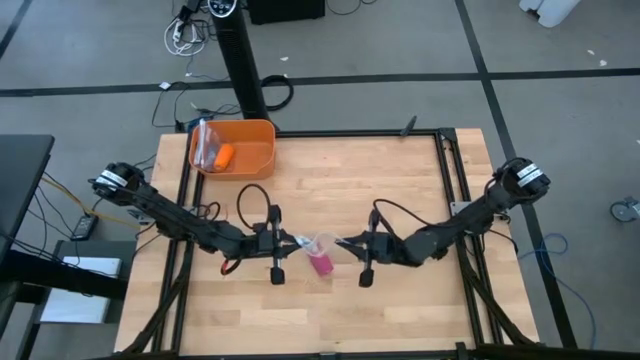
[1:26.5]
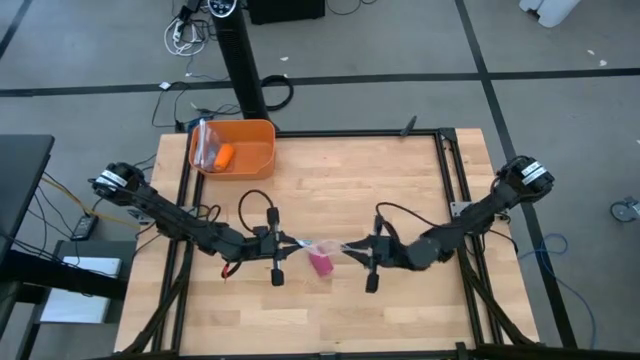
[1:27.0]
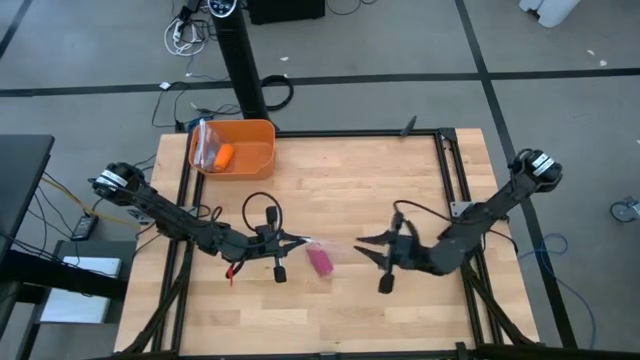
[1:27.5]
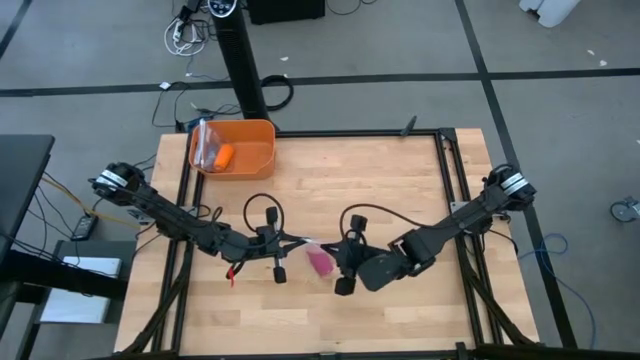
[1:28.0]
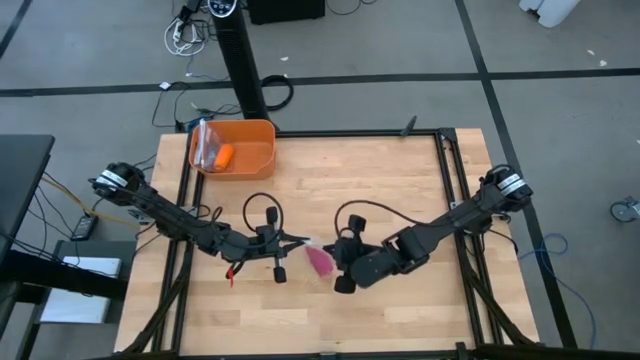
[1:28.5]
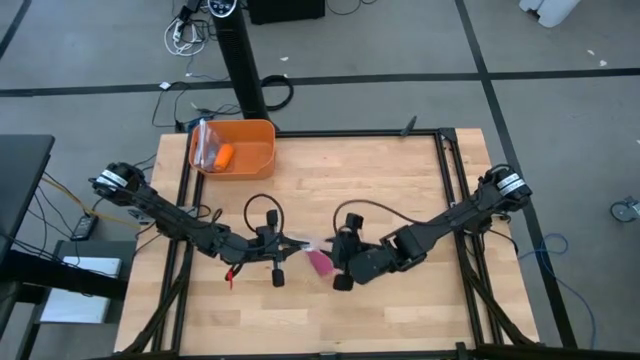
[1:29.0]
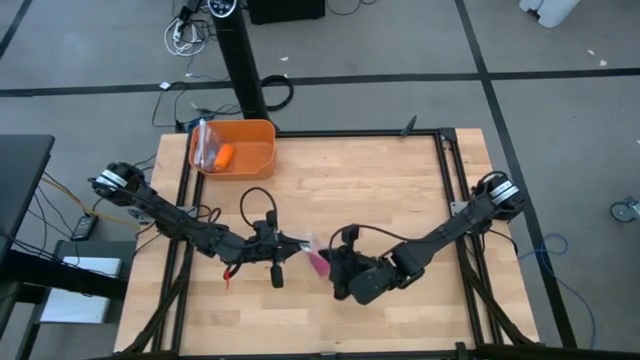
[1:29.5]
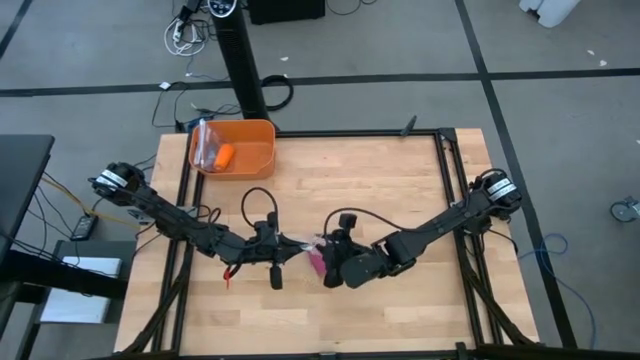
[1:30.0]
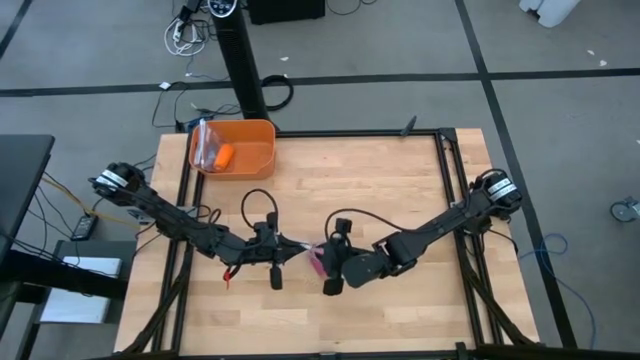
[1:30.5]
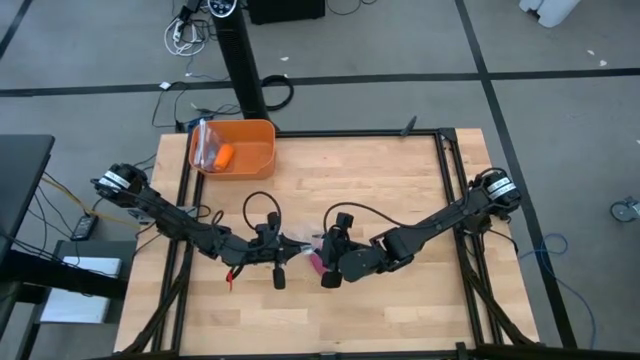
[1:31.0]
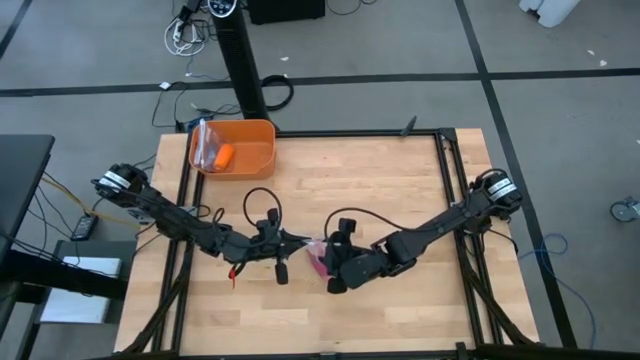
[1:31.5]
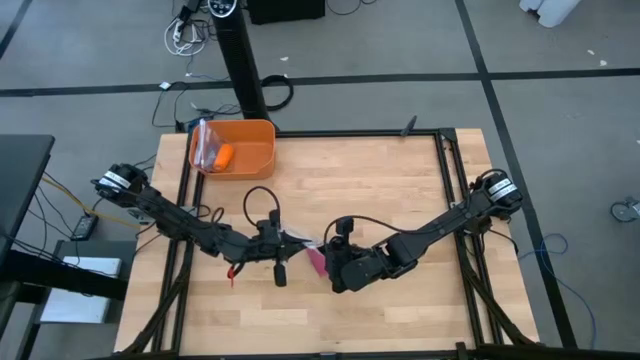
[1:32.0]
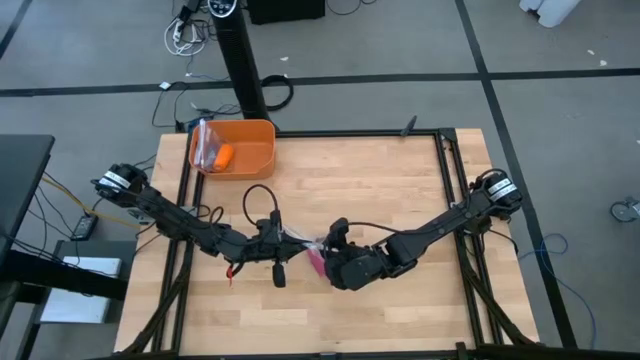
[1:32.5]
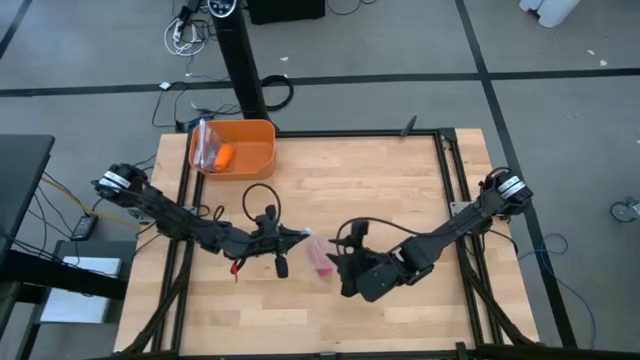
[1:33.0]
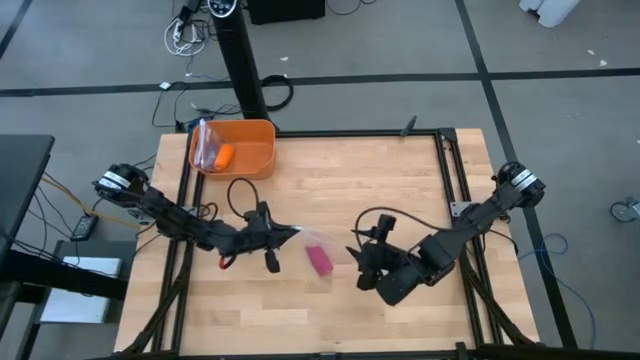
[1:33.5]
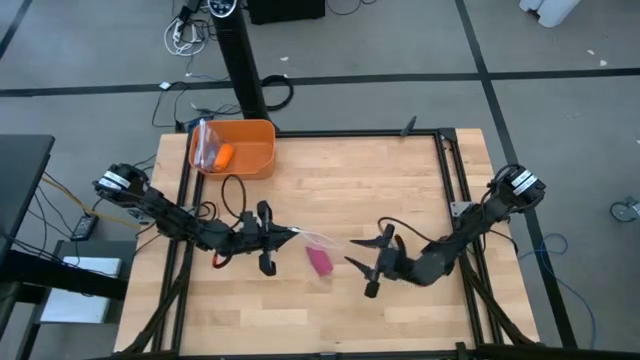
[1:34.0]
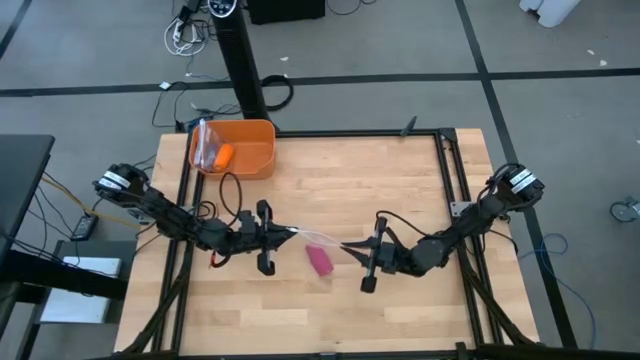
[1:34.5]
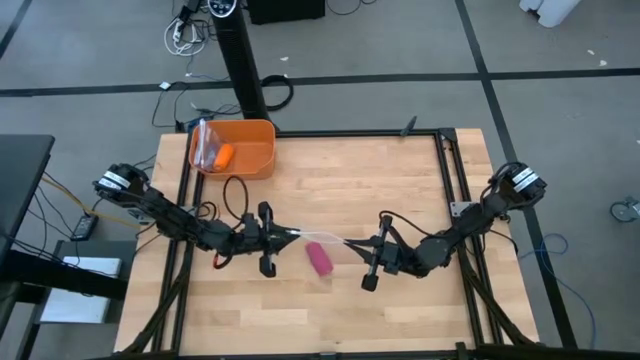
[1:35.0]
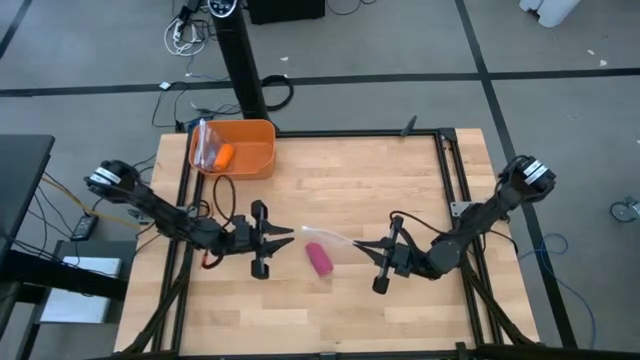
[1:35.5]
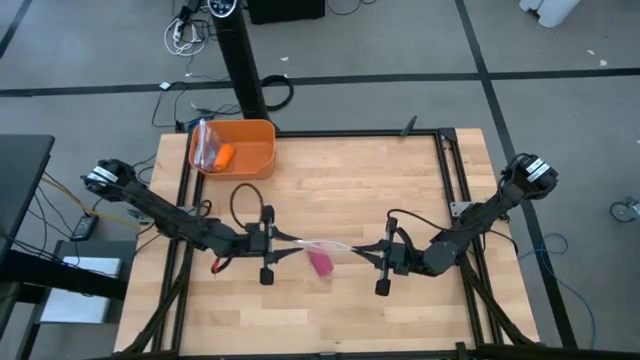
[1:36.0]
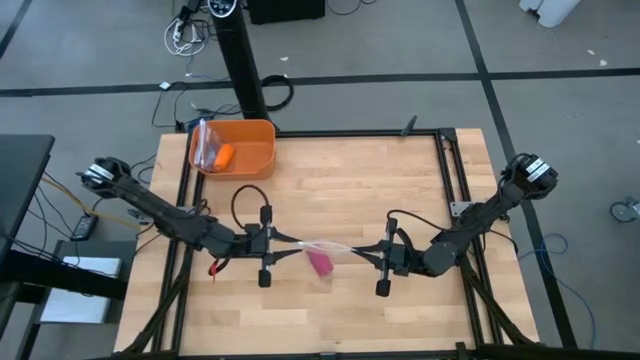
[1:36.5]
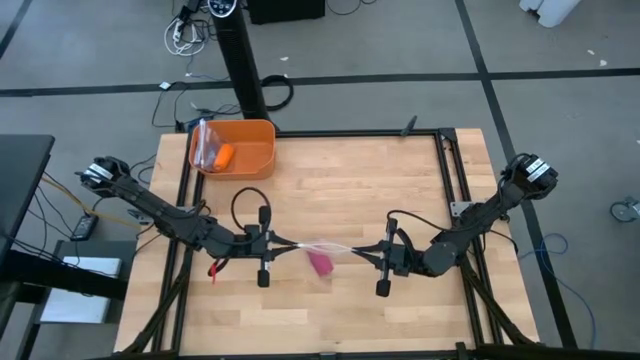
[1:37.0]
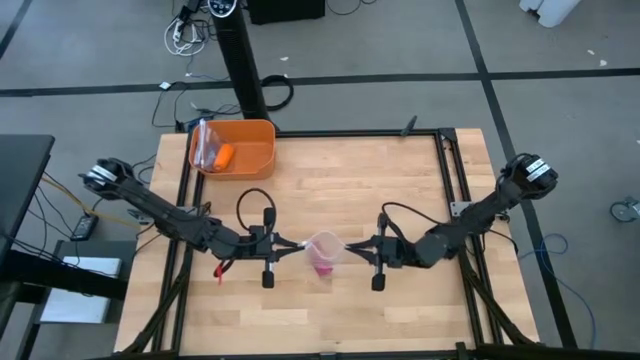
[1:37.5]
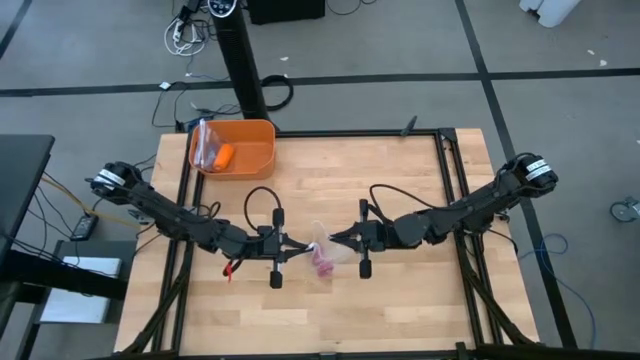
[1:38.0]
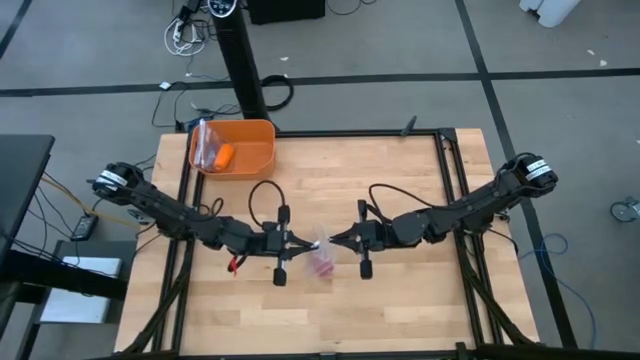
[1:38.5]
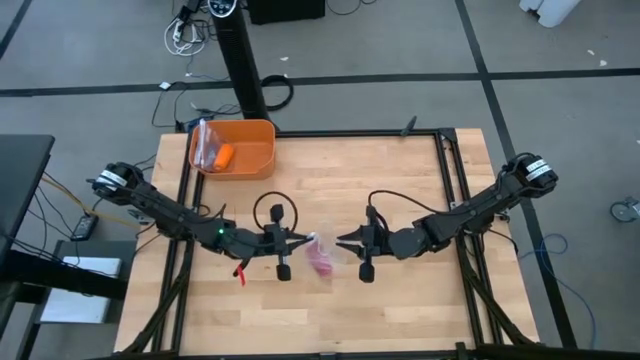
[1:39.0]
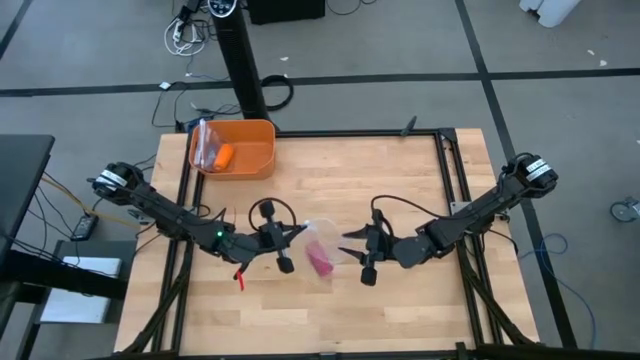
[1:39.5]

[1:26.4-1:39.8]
Task: Roll bandage
Open the transparent zip bag

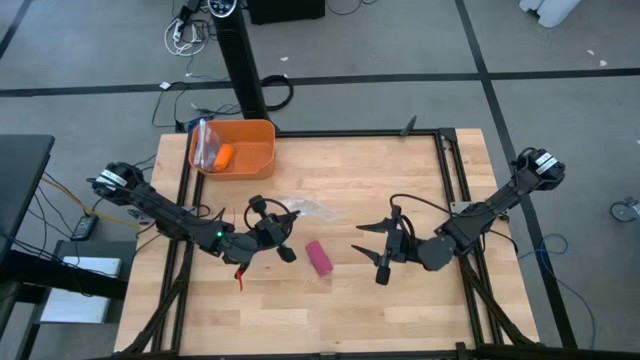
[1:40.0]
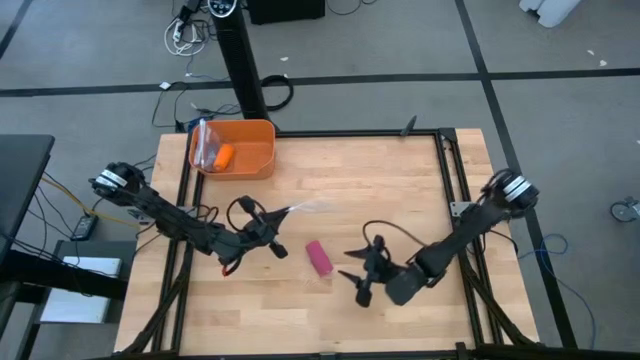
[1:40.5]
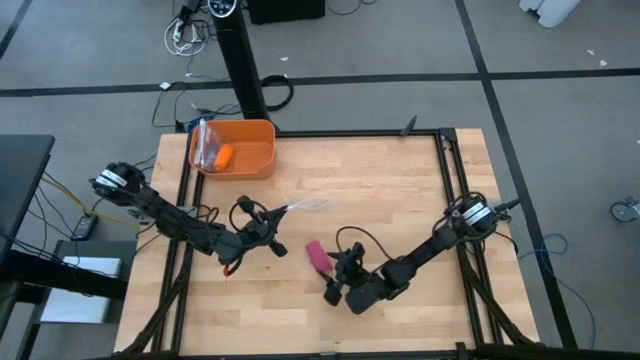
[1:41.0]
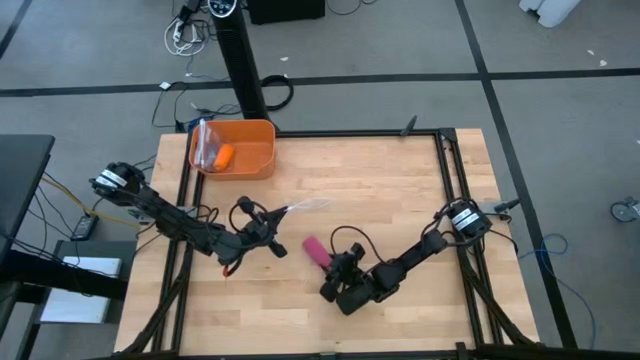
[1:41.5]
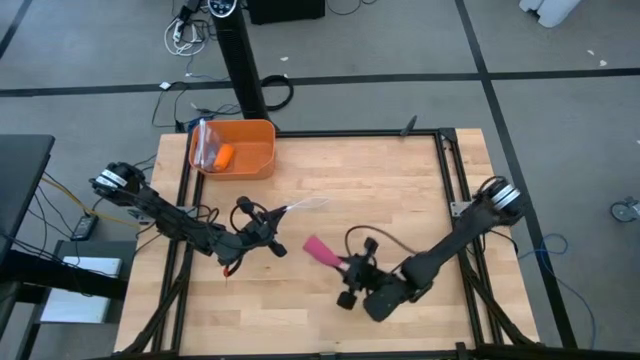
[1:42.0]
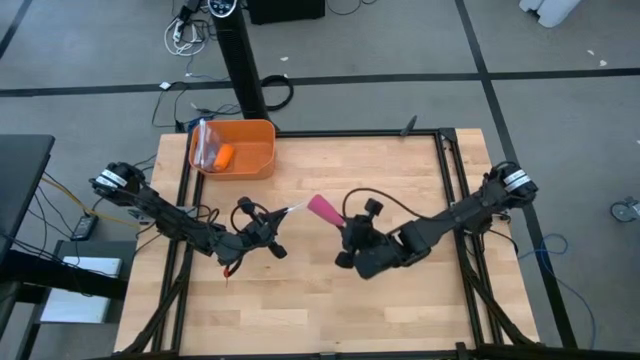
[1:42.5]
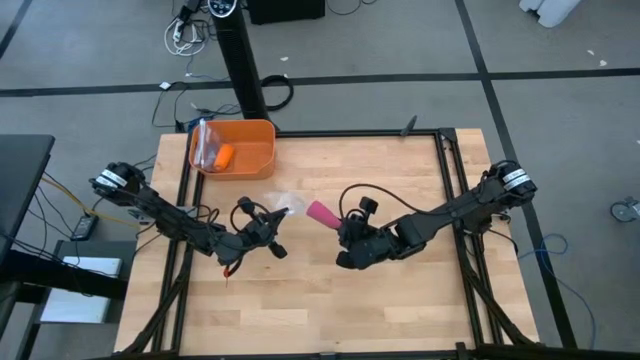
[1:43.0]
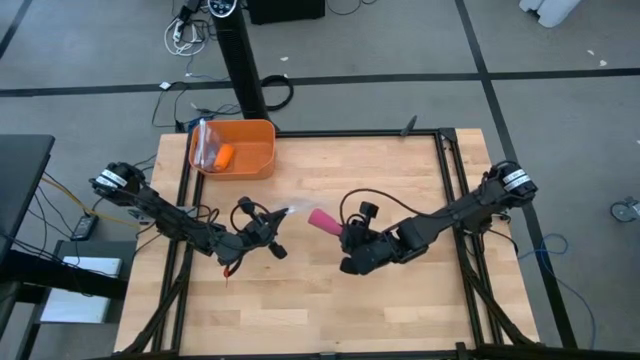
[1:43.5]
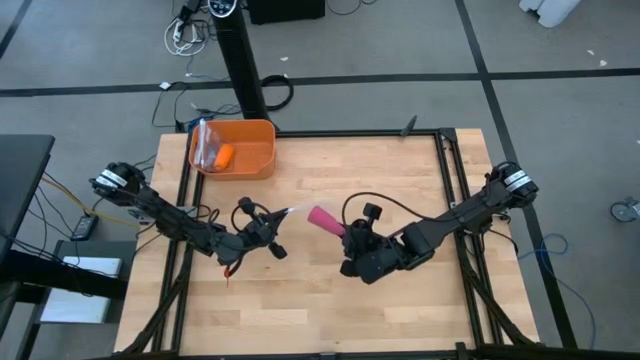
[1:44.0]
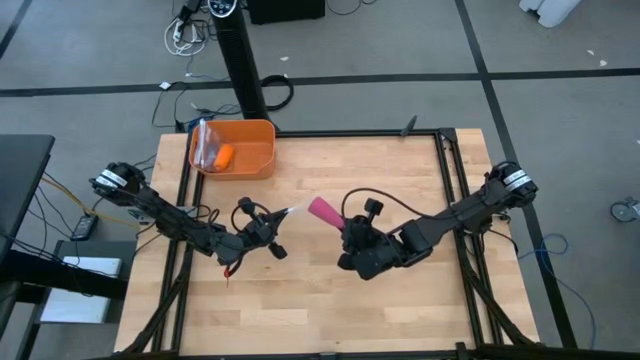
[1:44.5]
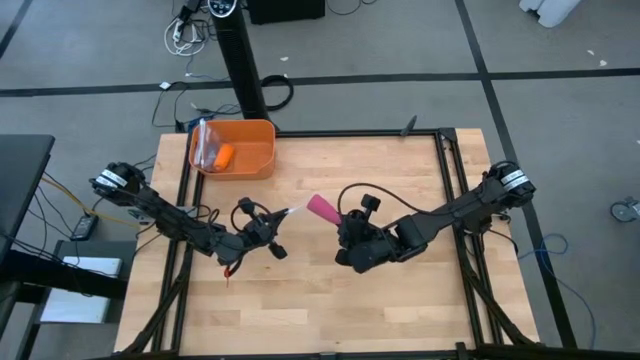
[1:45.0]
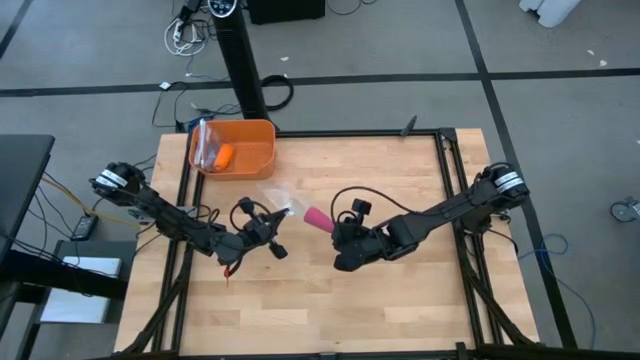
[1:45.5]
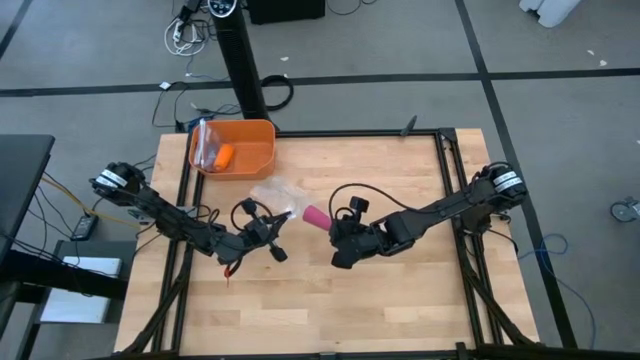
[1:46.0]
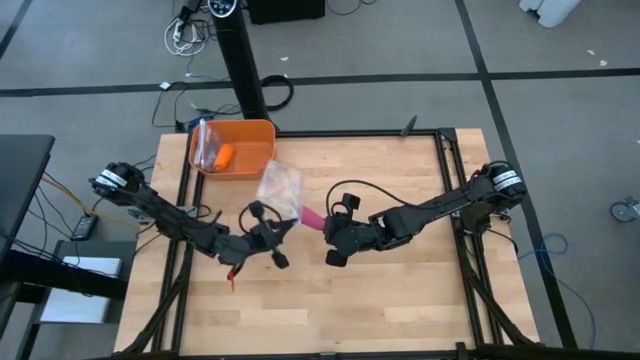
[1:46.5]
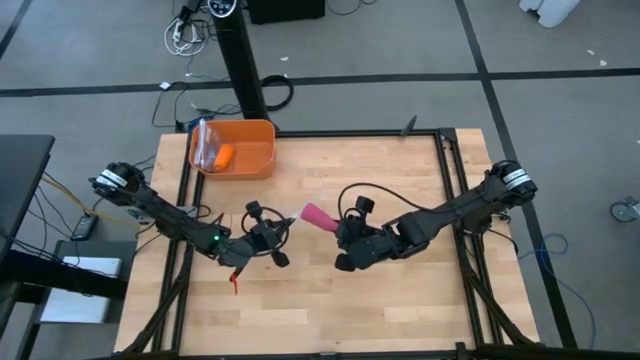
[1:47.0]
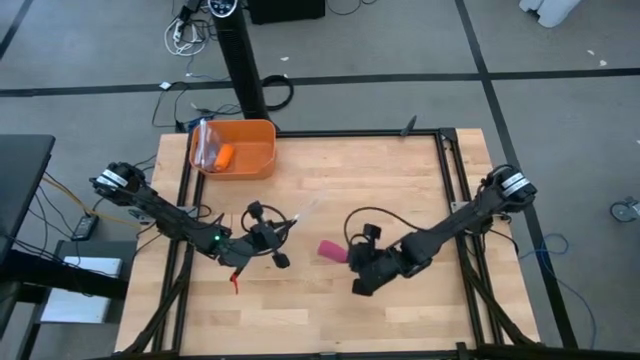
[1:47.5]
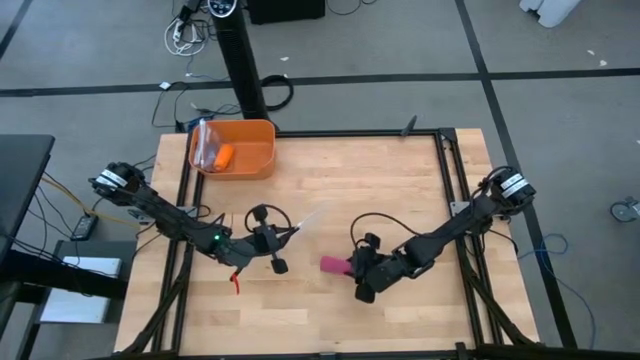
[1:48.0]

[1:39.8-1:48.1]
Put the pink bandage into the transparent zip bag
